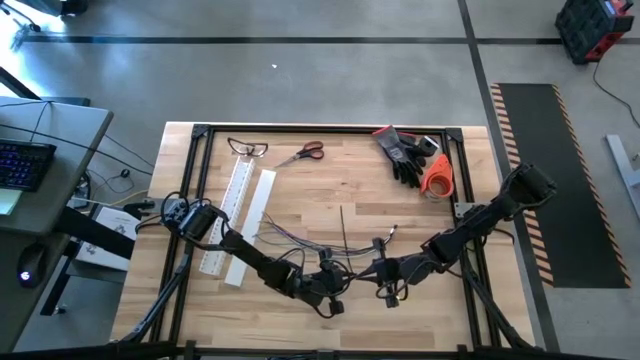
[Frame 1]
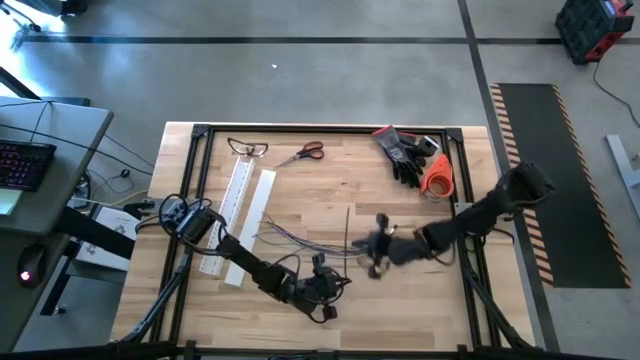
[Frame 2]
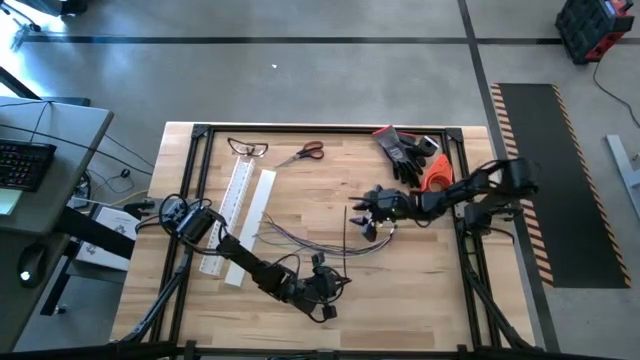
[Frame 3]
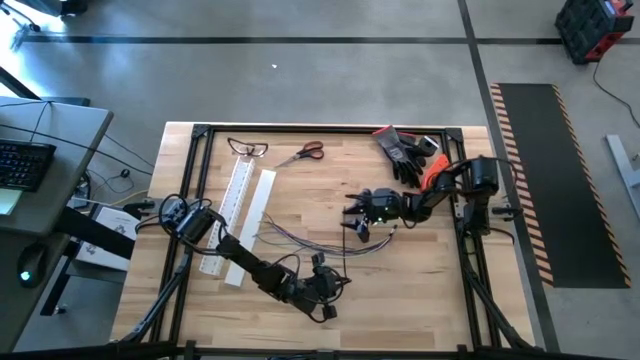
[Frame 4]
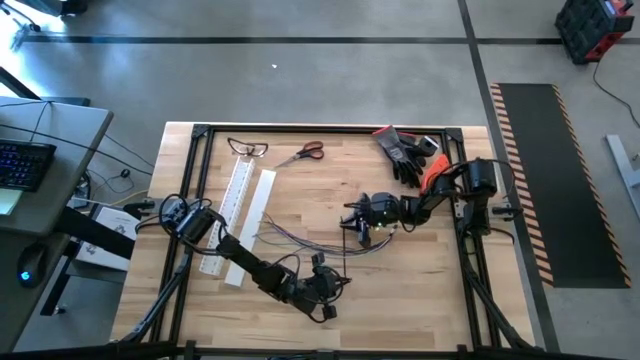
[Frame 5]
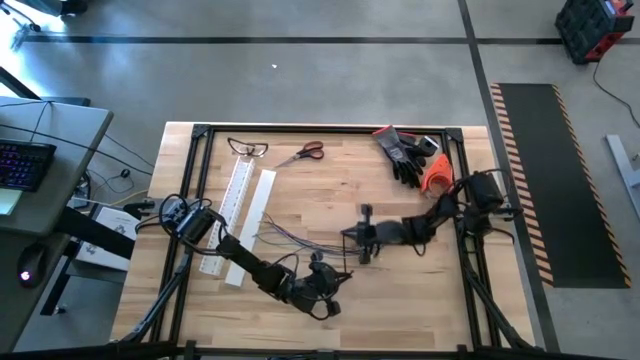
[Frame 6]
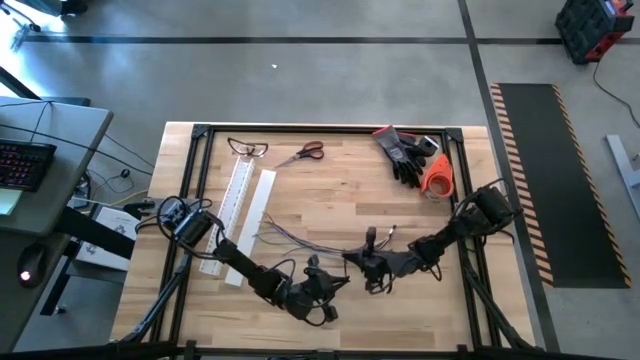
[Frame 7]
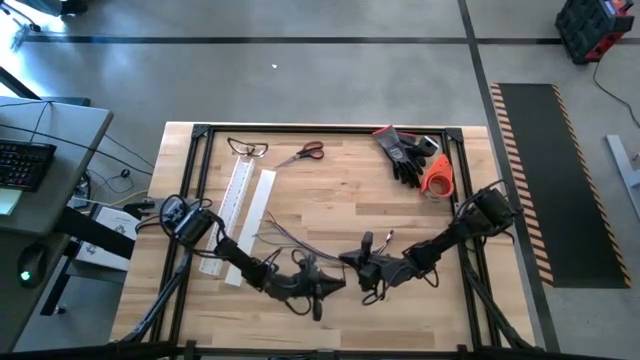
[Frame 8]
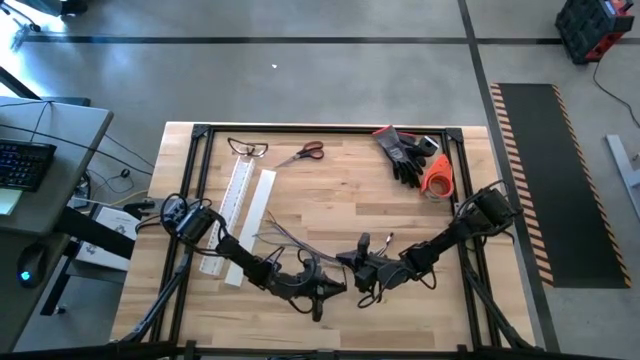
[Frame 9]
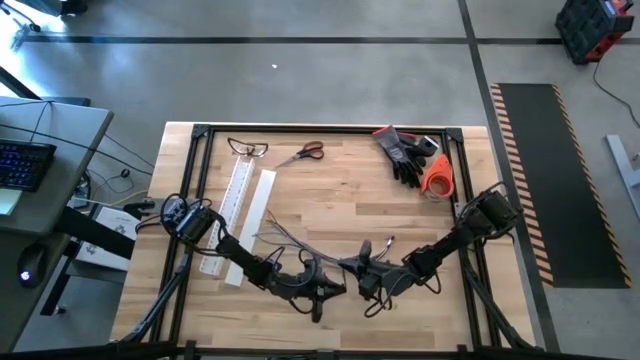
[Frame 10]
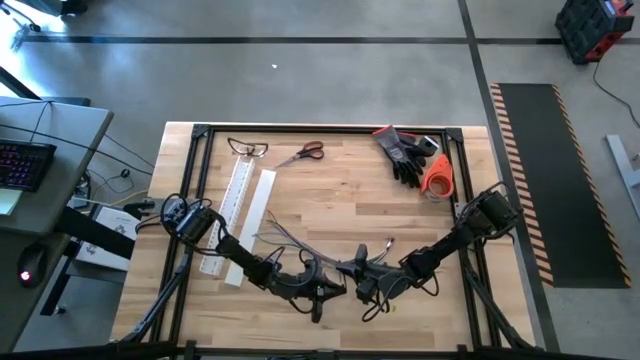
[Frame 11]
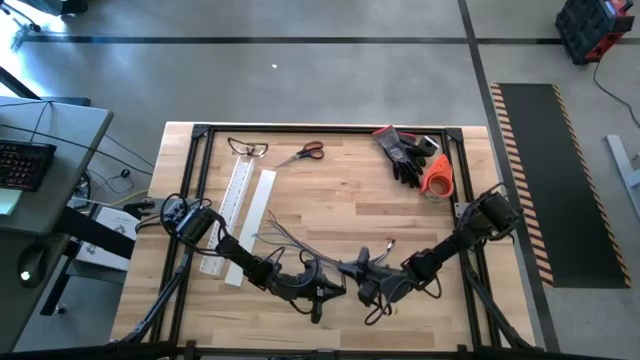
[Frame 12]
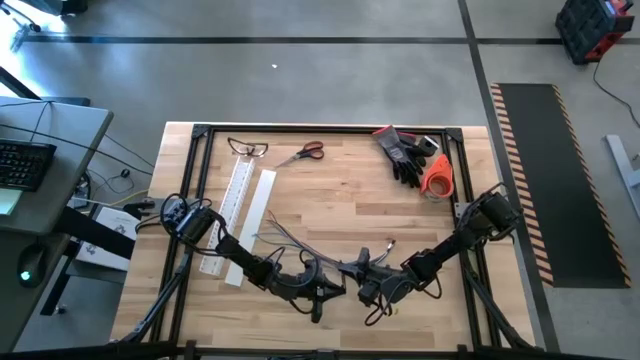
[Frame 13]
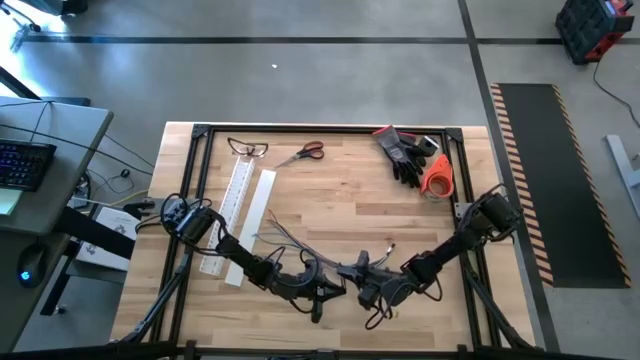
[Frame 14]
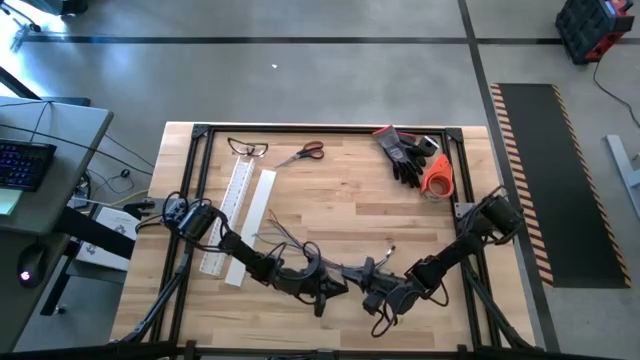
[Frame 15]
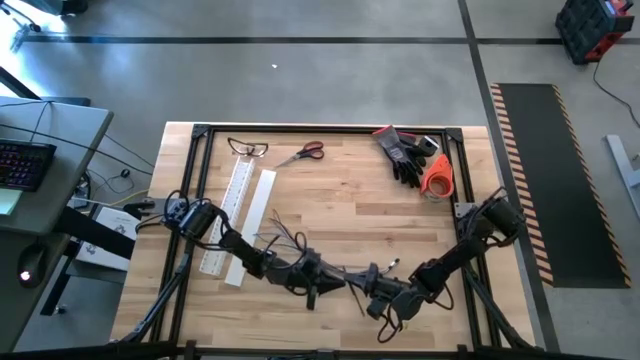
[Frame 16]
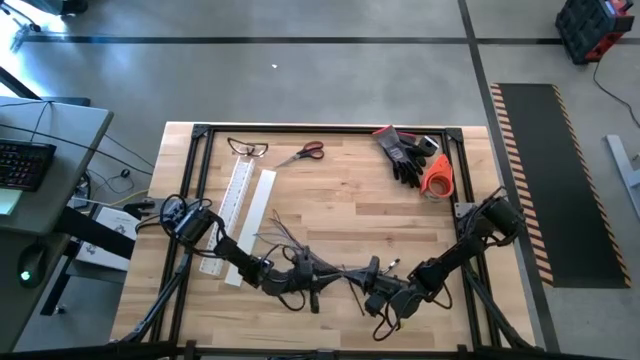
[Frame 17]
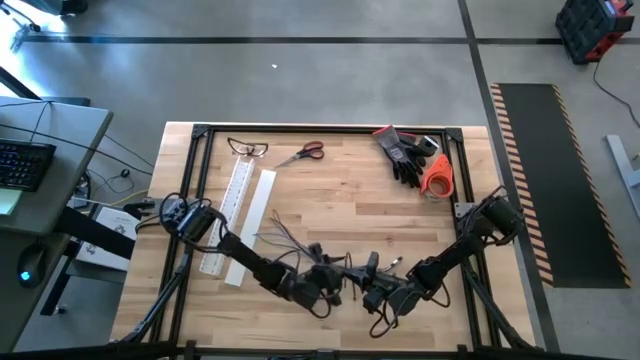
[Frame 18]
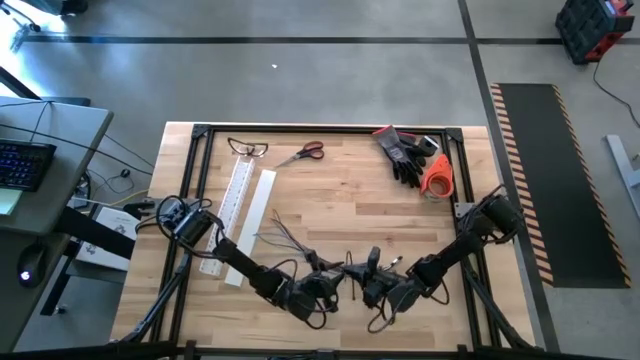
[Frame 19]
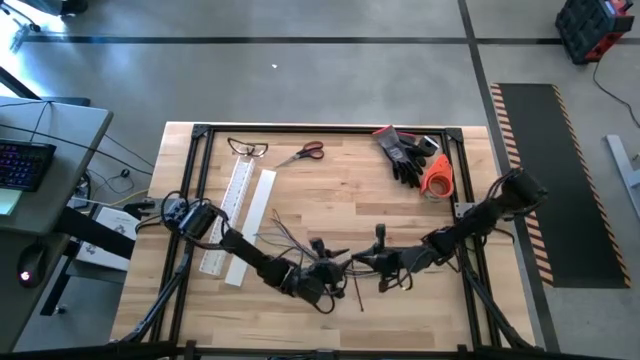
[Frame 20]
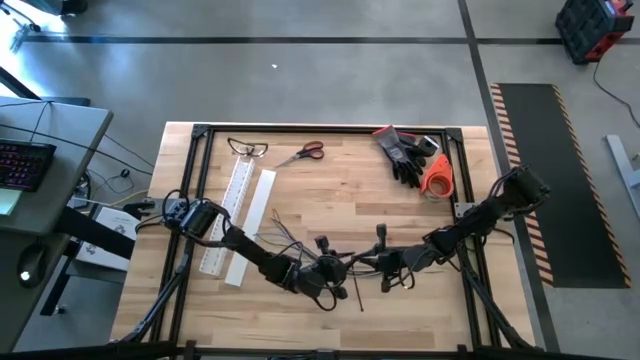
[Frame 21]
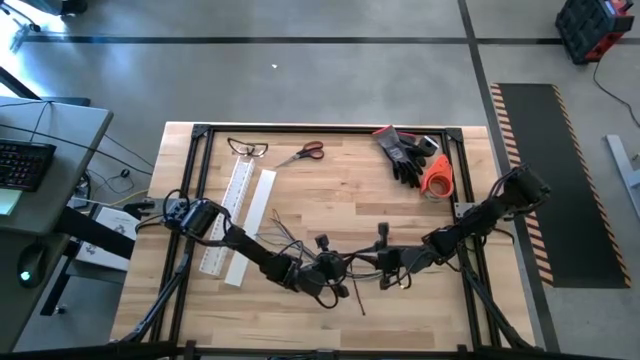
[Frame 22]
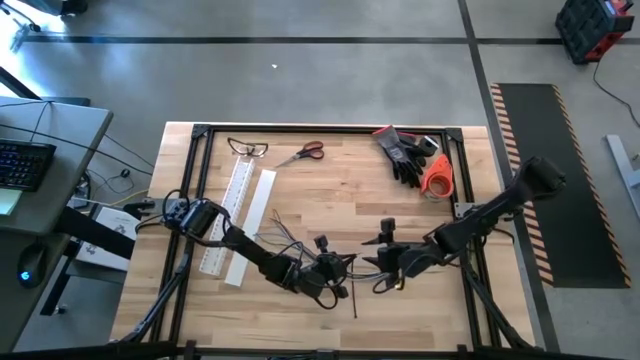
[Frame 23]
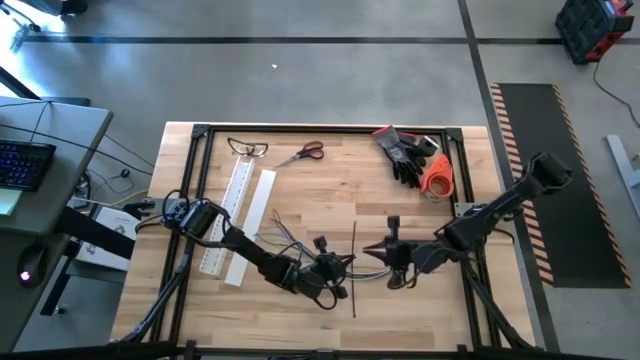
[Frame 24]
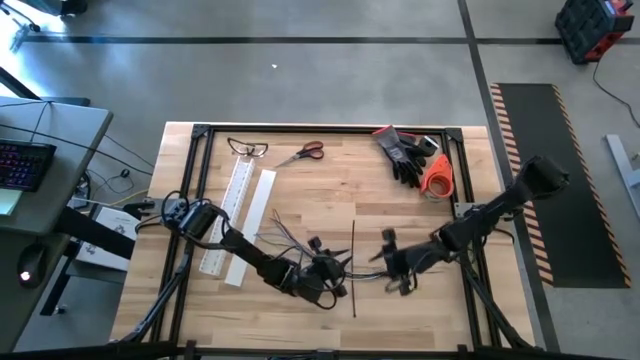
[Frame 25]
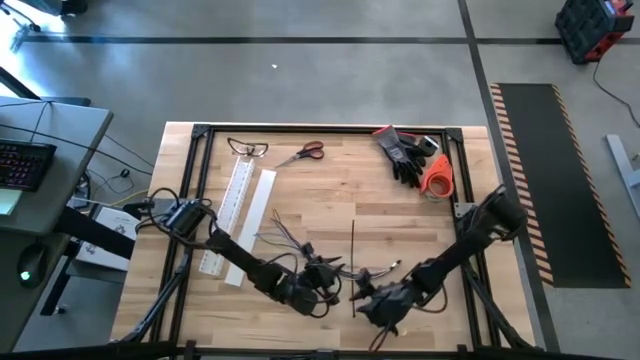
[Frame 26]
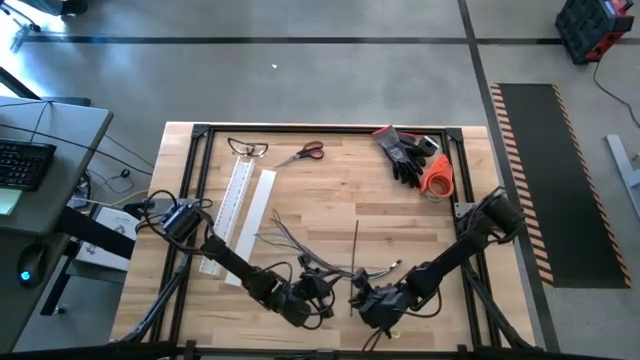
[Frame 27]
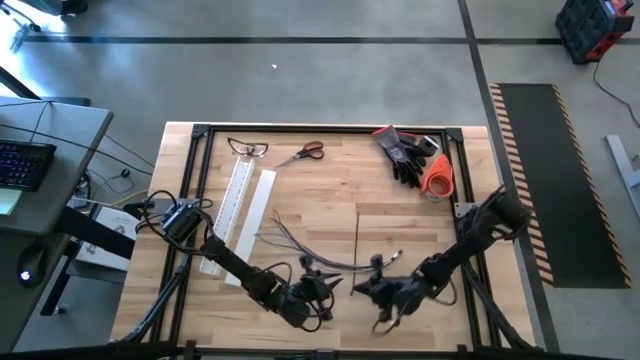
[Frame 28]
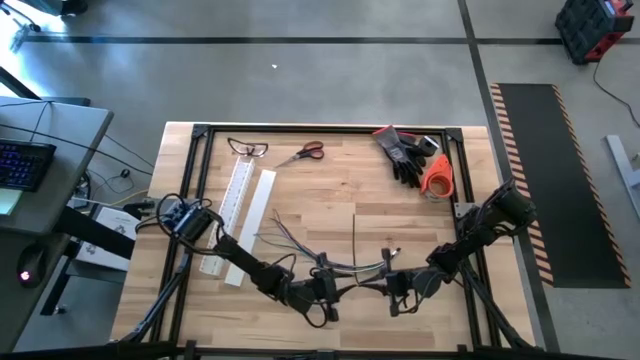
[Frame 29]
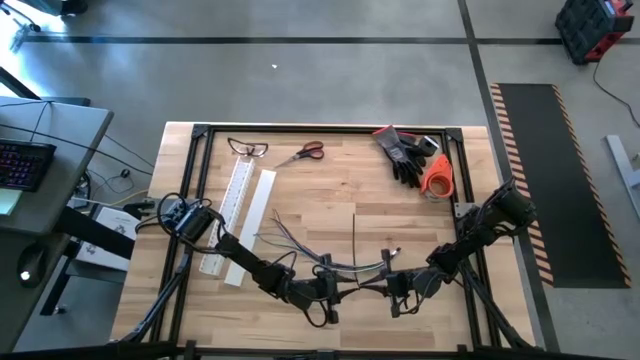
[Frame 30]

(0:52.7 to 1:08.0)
Task: Ziptie cables
Wrap the black zip tie around the cable

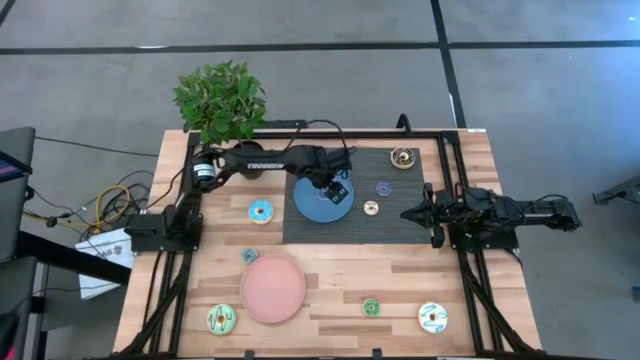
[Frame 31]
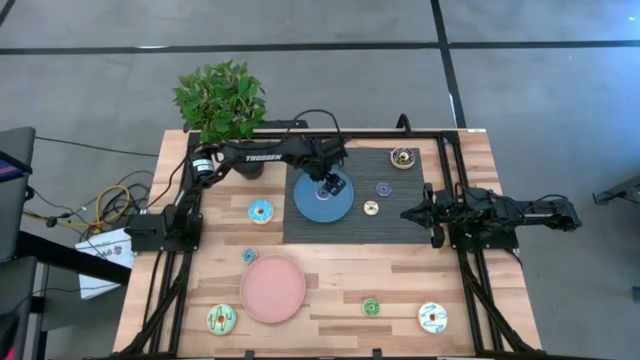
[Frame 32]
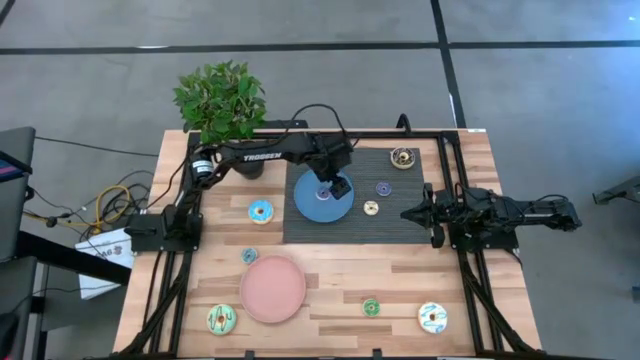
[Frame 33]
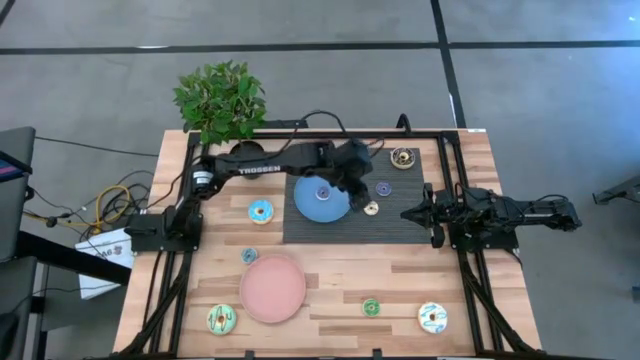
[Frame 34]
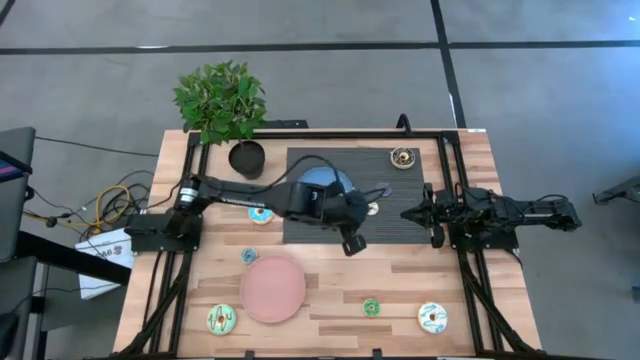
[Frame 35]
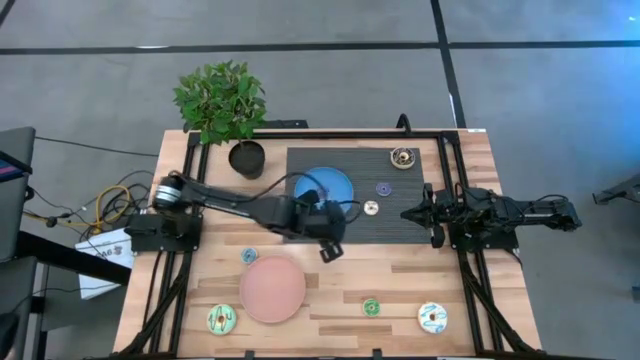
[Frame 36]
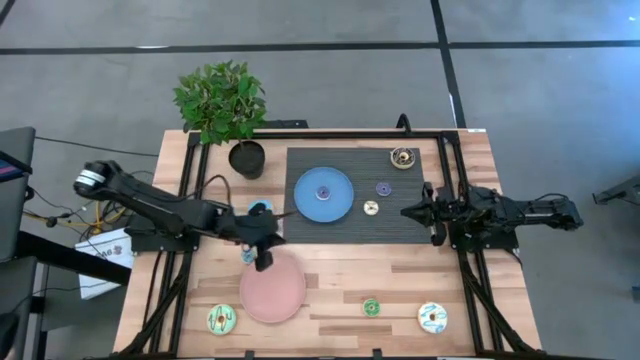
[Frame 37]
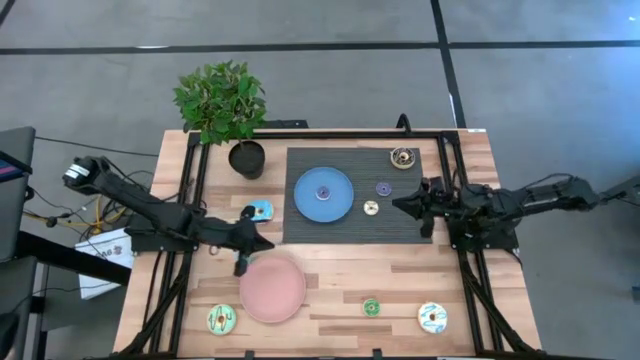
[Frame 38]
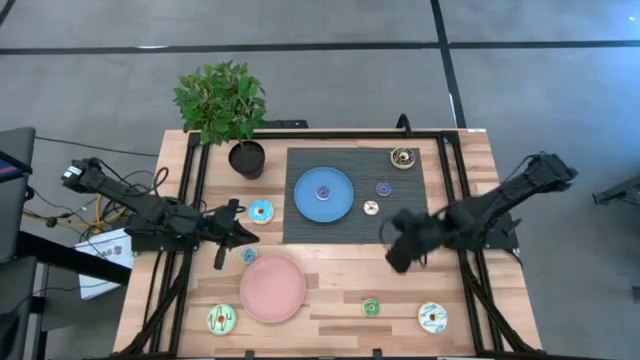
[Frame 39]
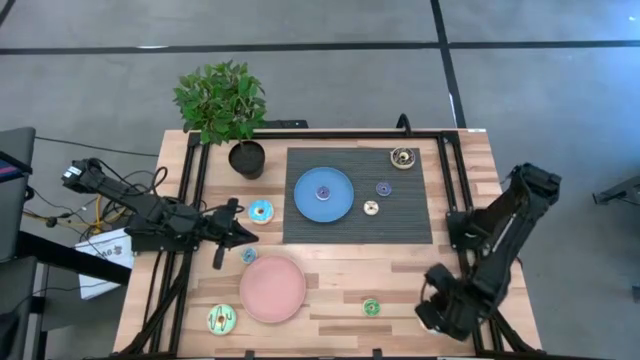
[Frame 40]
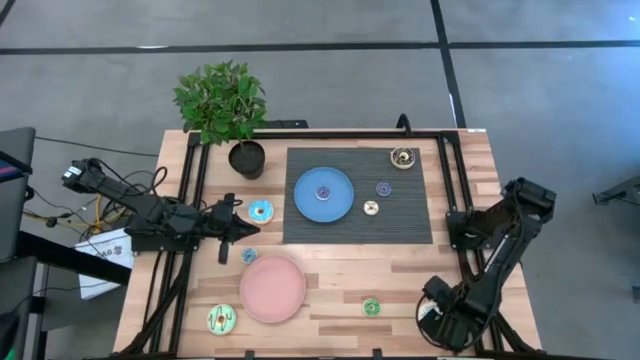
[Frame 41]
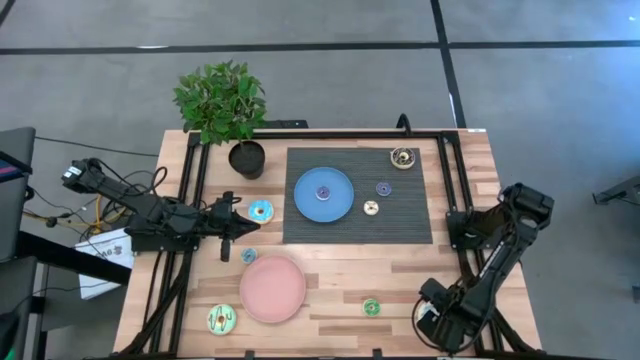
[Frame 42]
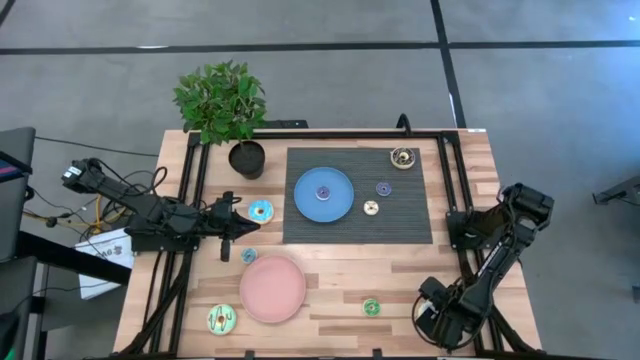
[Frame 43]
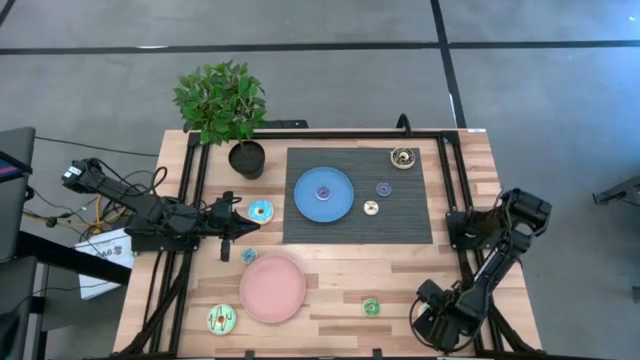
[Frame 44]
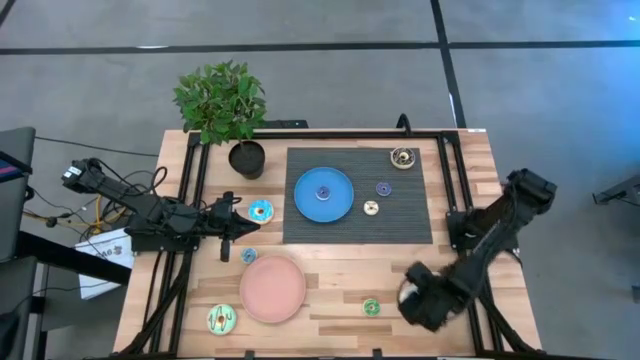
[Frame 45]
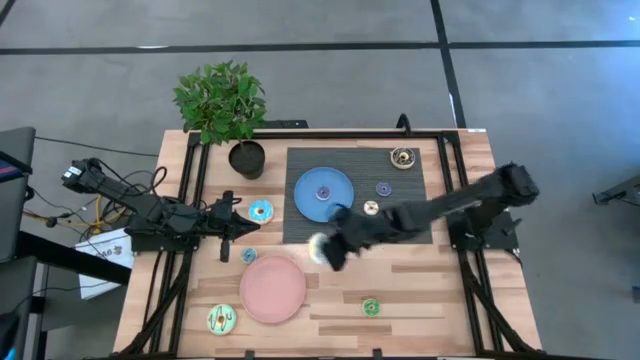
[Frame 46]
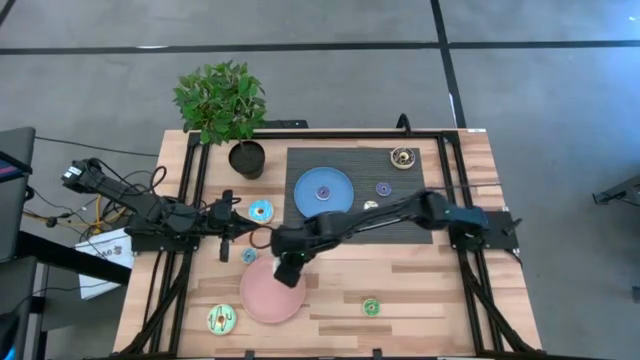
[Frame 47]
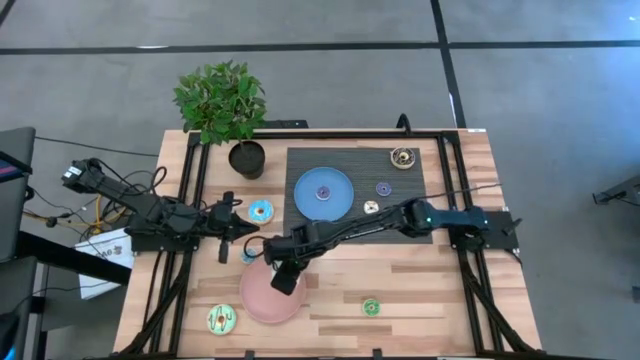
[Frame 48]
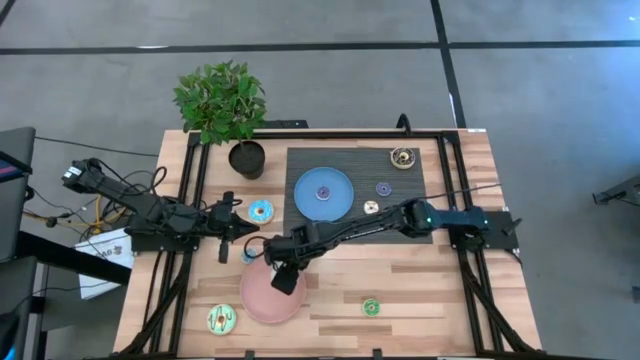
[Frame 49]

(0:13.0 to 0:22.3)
Task: Pick & Place donuts
Put the large white donut on the light orange plate
